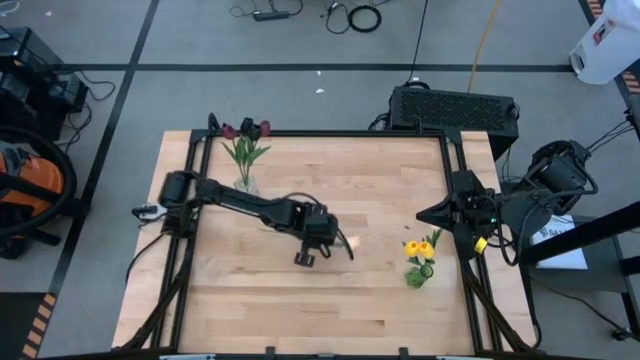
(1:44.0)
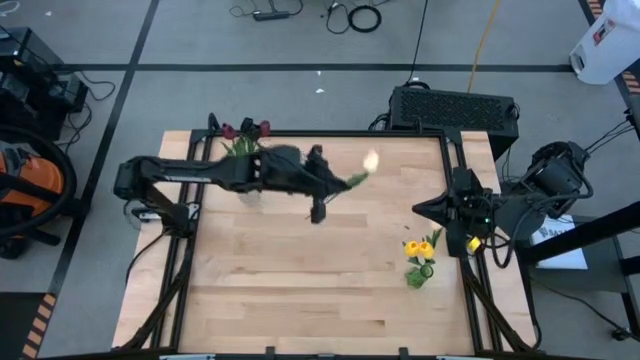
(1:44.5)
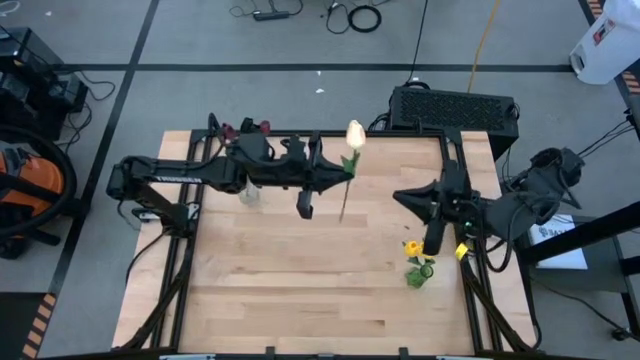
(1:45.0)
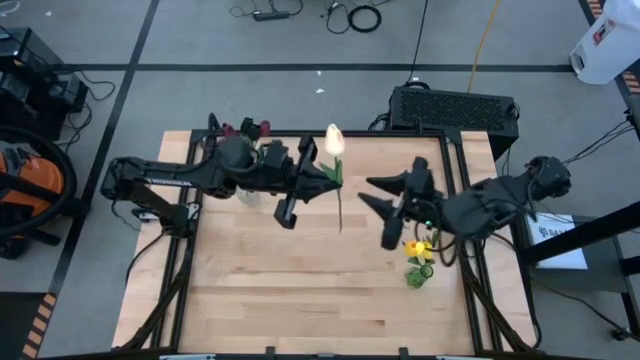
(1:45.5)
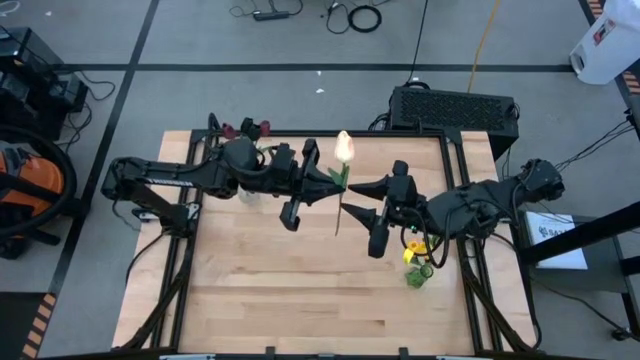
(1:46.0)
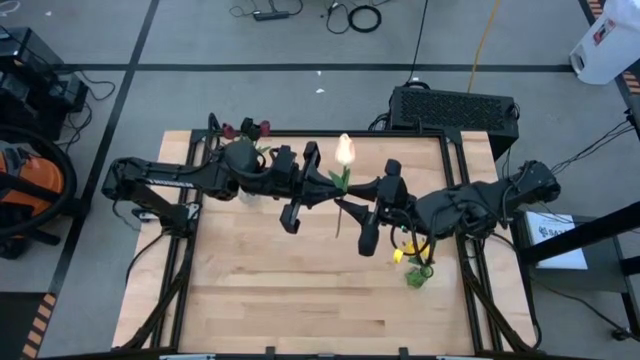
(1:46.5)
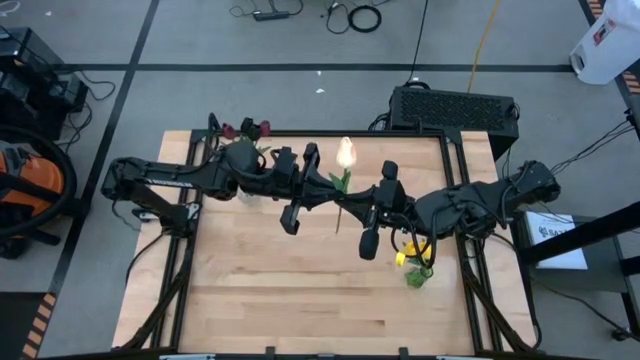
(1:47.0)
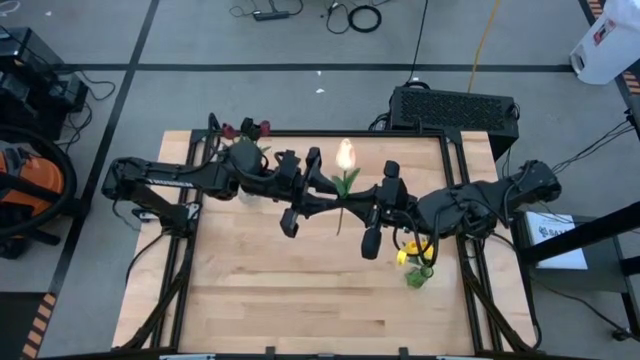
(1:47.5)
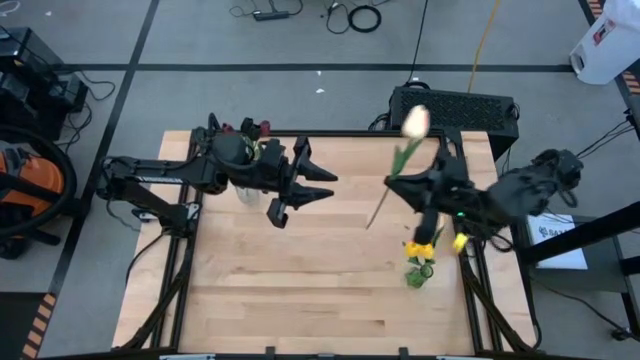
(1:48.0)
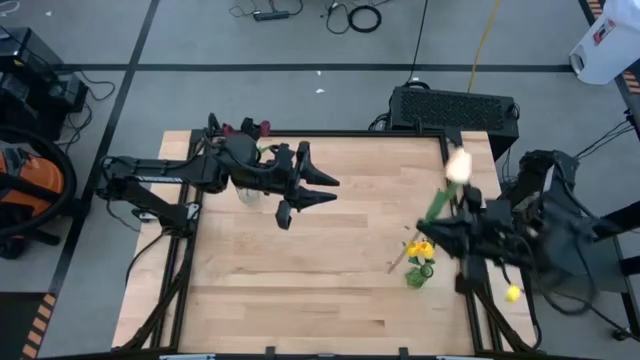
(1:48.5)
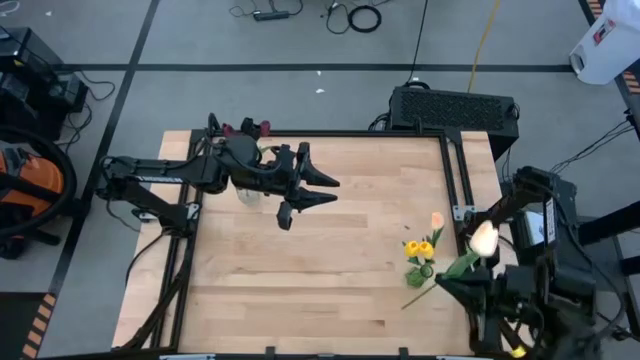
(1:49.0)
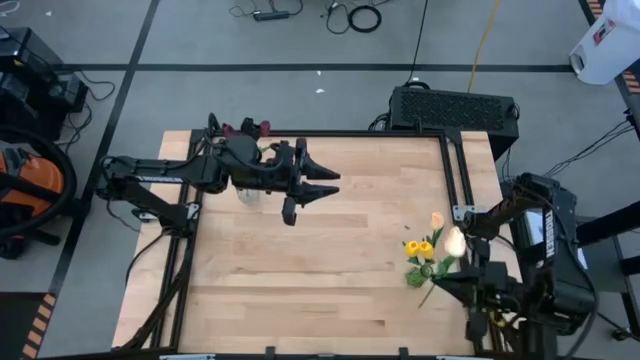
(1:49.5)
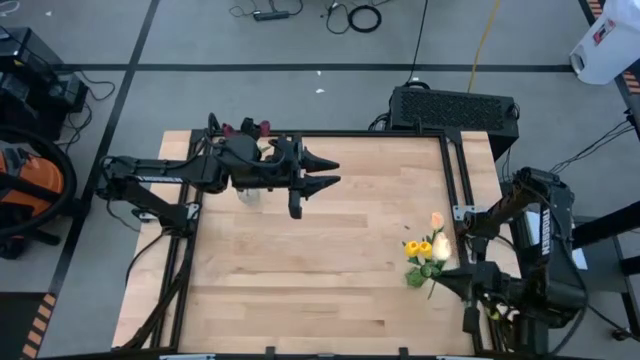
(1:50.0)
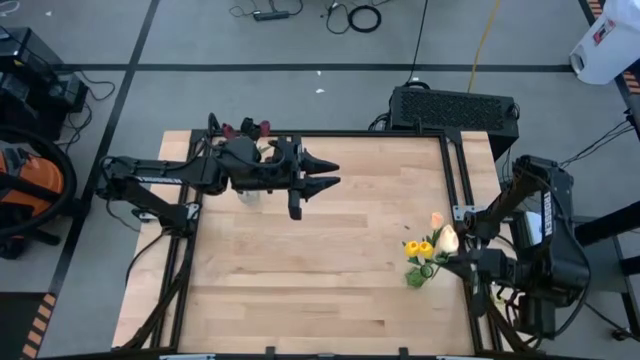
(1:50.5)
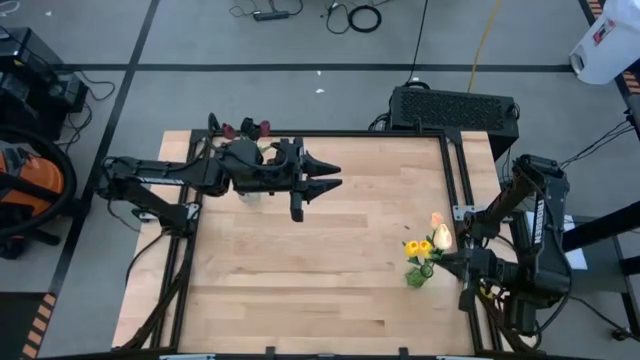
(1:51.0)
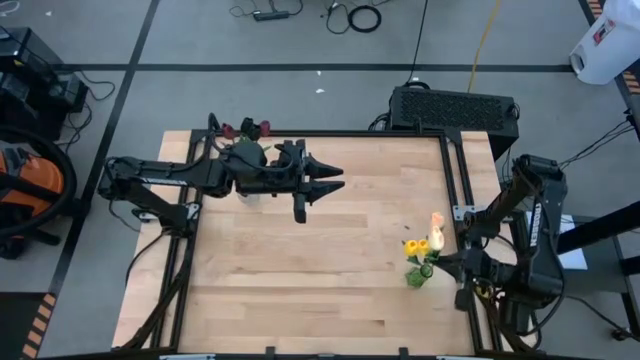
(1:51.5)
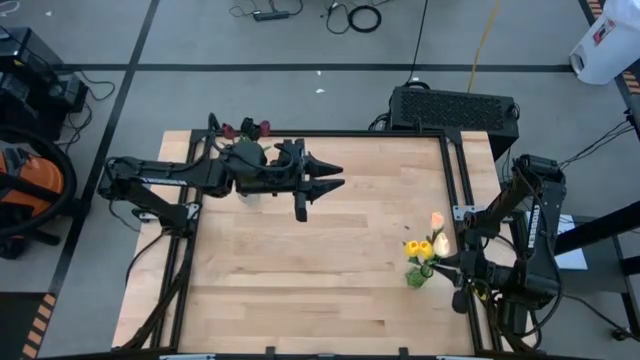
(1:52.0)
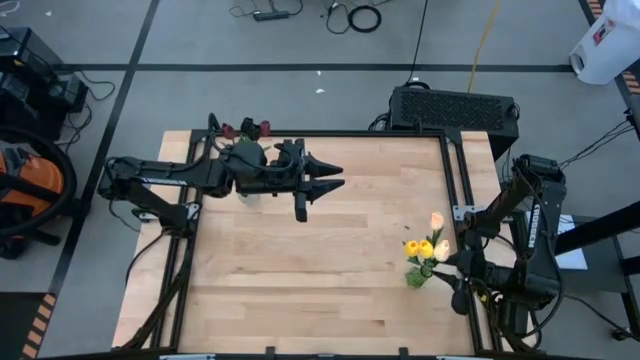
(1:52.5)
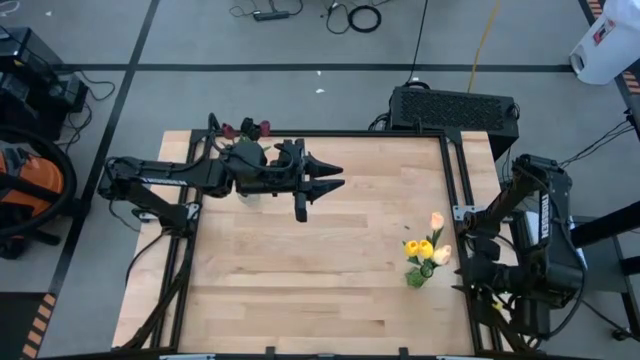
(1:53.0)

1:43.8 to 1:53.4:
Task: Sort flowers into vase by color
Put the white flower into the transparent green vase

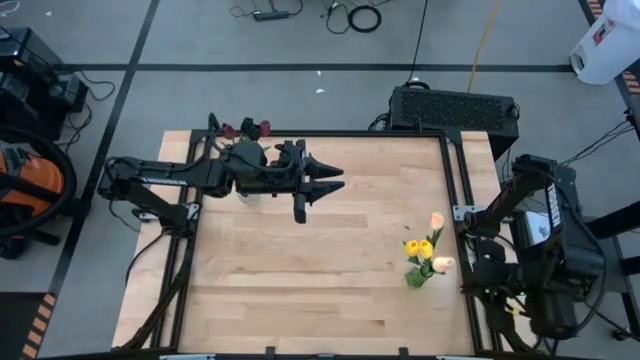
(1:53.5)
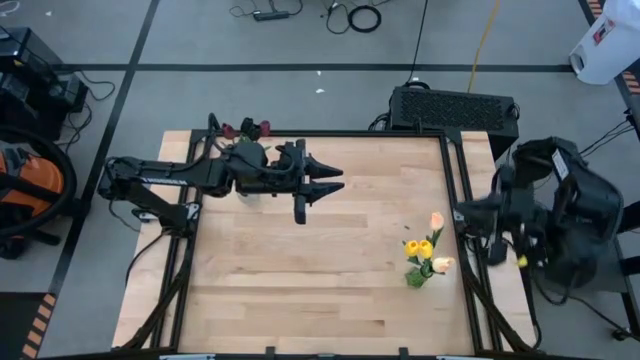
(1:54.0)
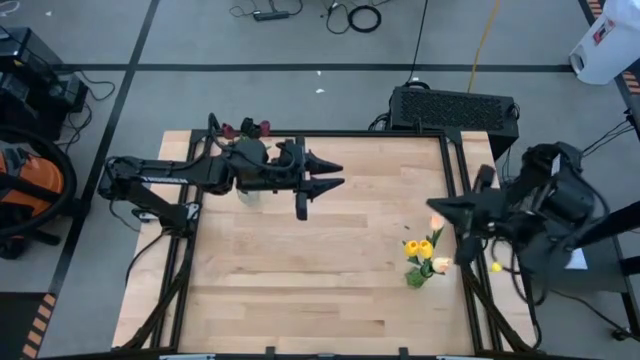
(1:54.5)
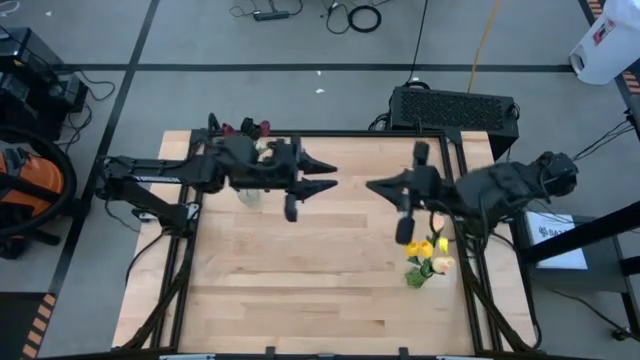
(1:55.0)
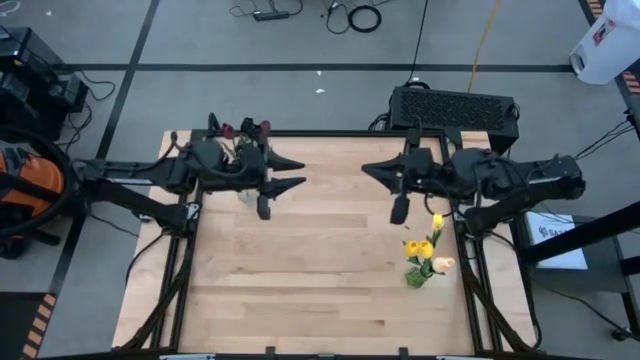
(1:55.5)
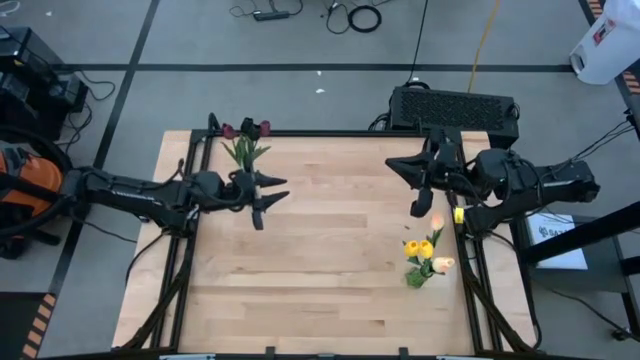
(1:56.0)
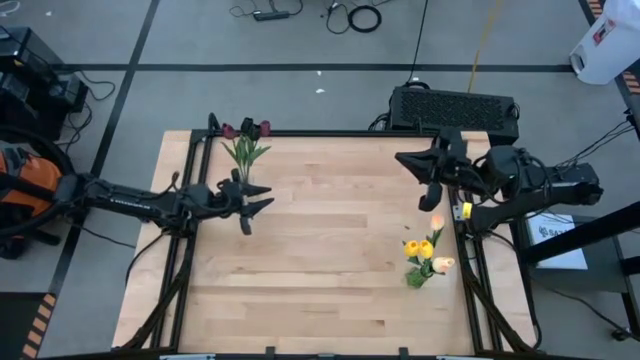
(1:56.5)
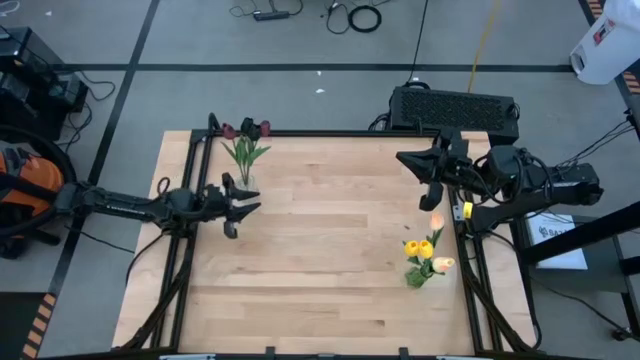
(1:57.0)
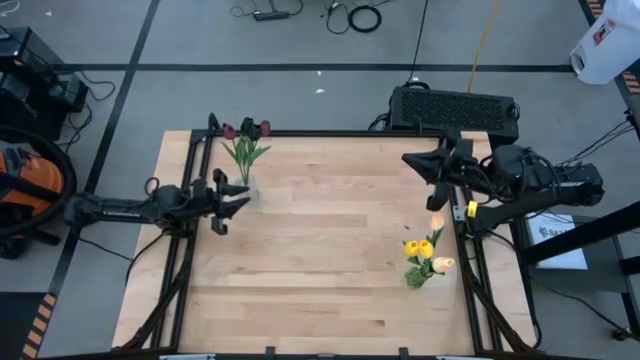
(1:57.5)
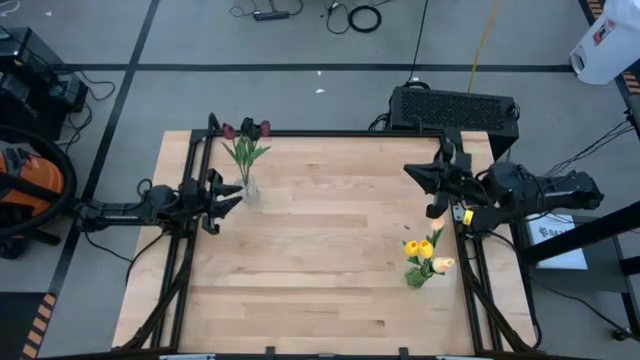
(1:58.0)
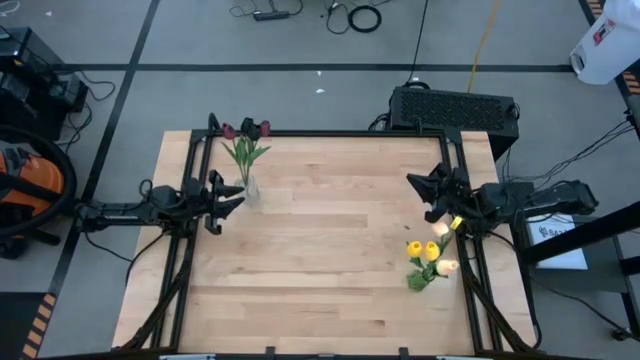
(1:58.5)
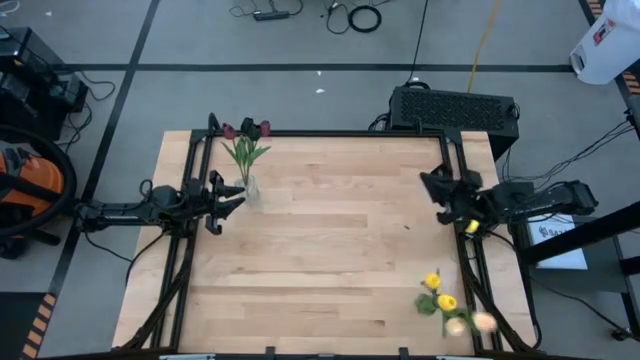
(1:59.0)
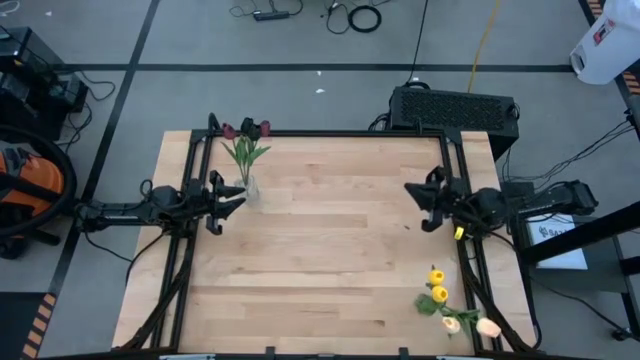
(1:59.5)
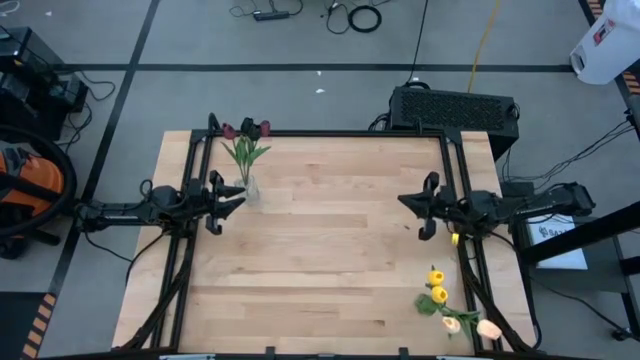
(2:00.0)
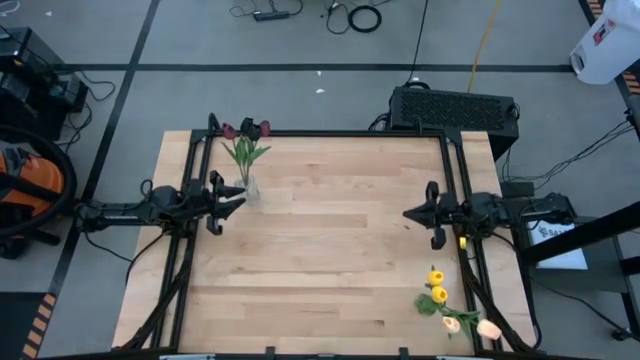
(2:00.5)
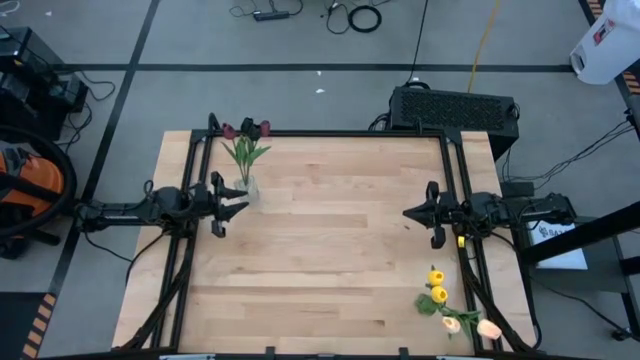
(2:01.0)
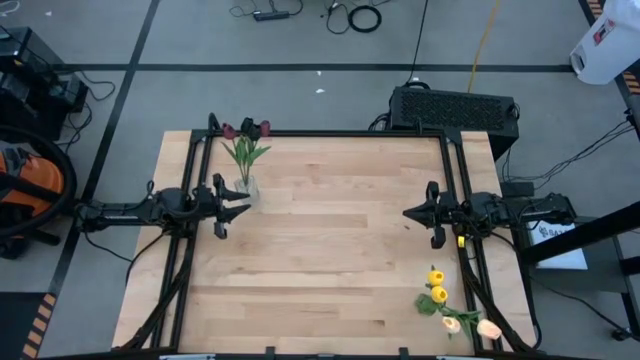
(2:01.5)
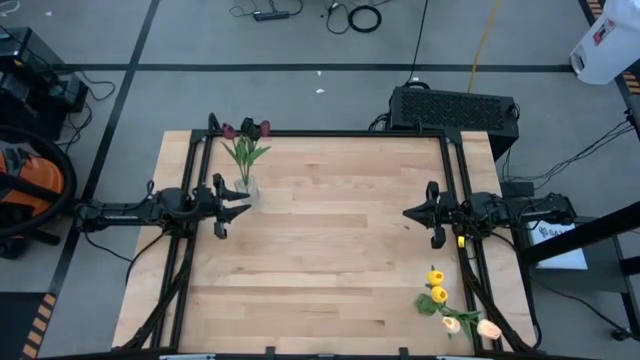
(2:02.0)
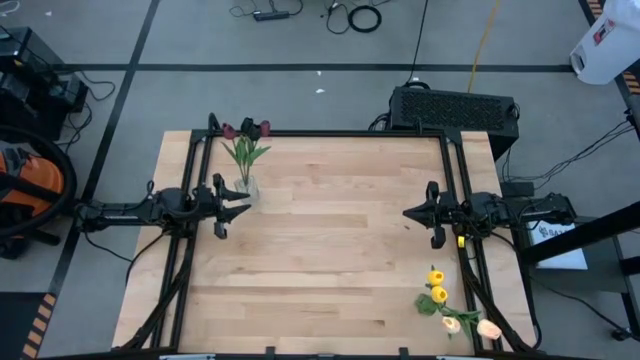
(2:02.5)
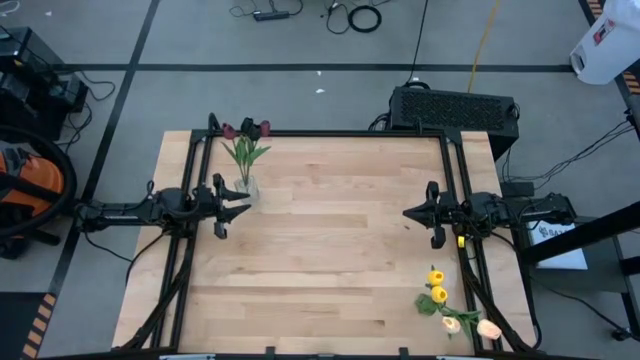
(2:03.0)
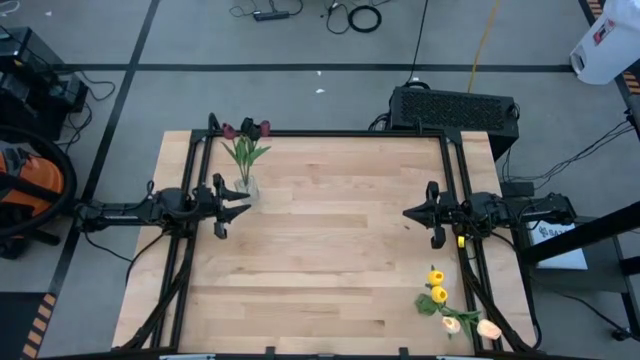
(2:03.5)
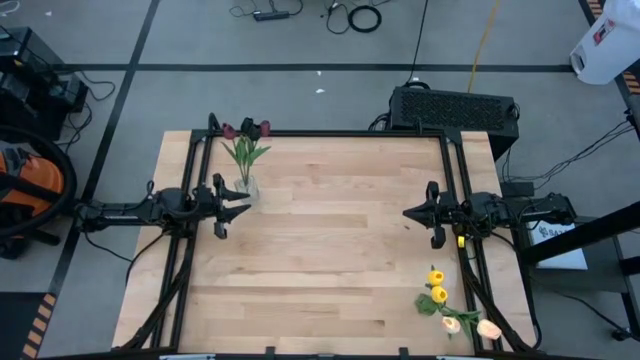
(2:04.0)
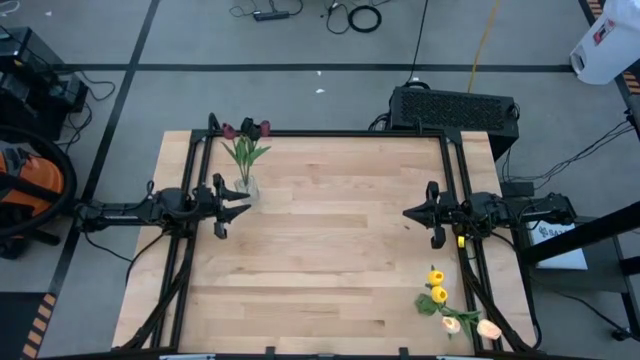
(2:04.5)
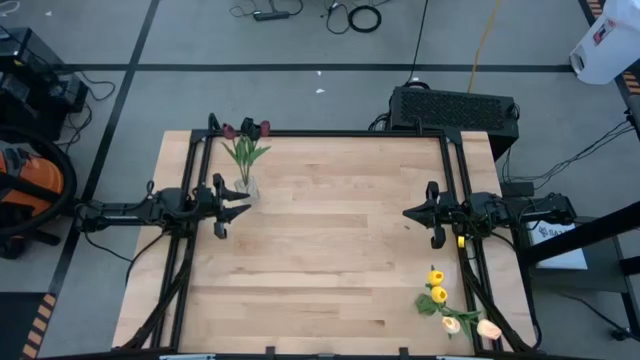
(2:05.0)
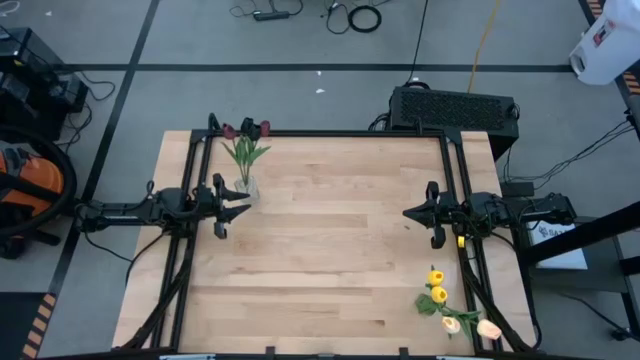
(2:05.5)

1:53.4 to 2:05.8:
Return to Home Position
